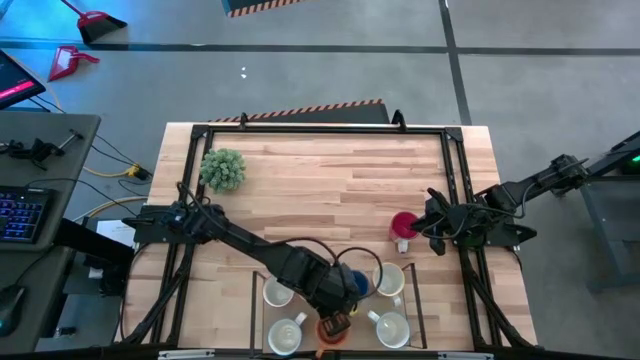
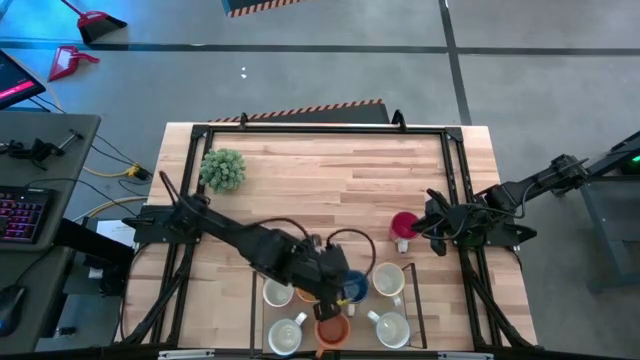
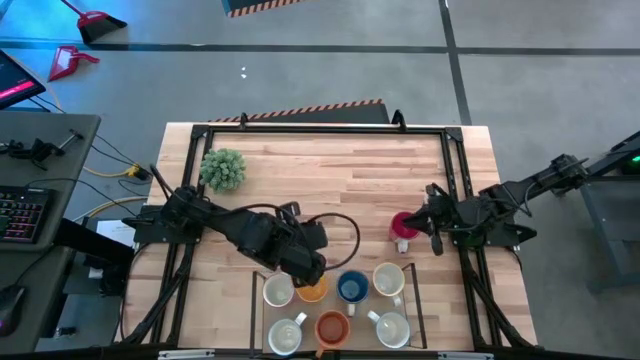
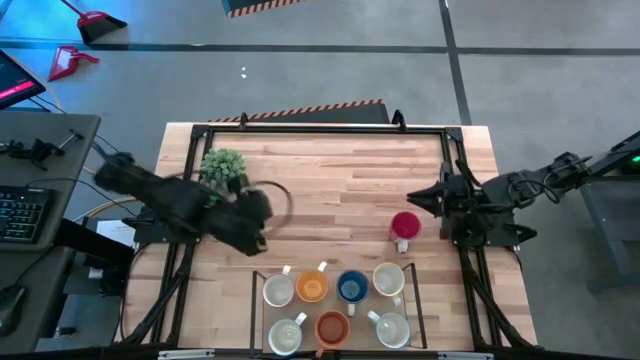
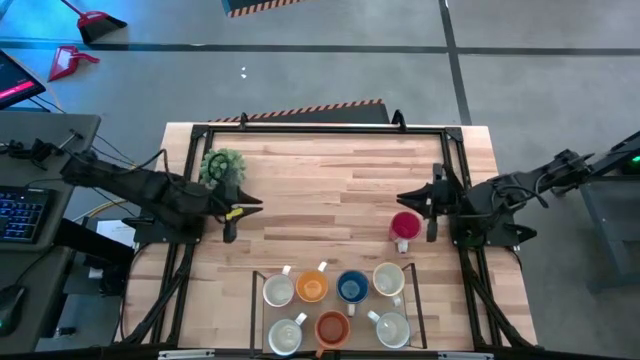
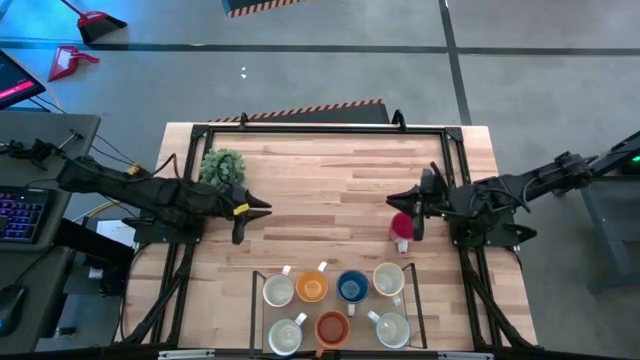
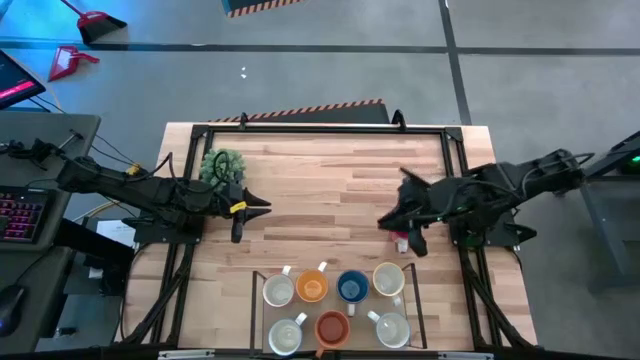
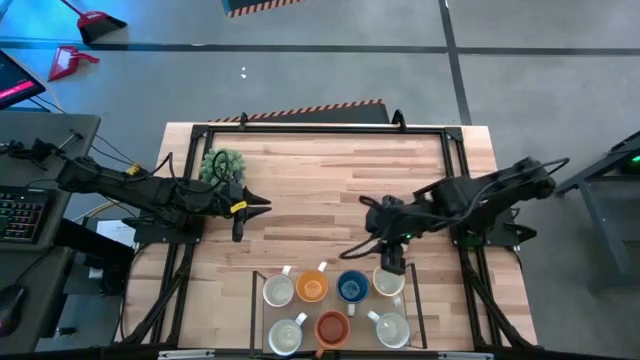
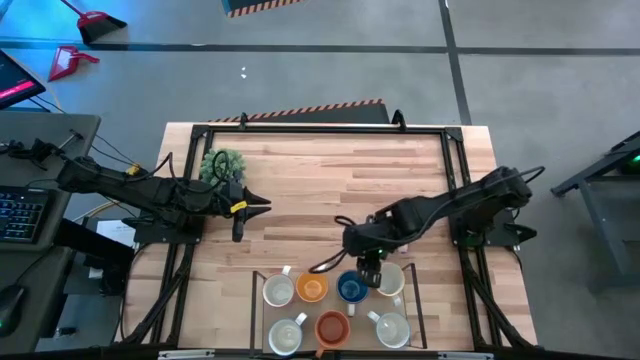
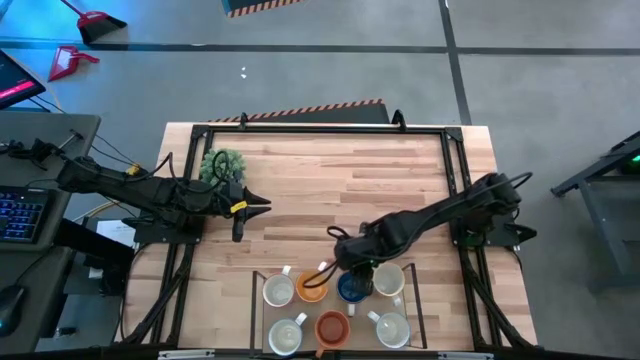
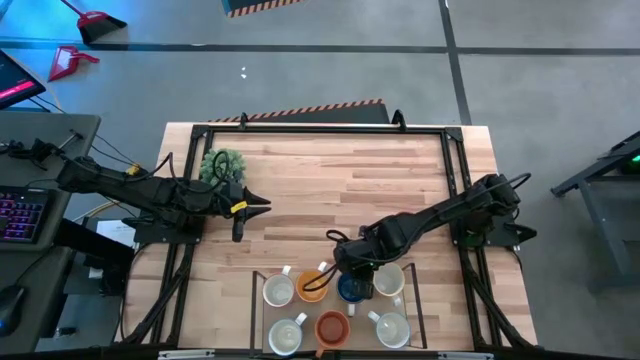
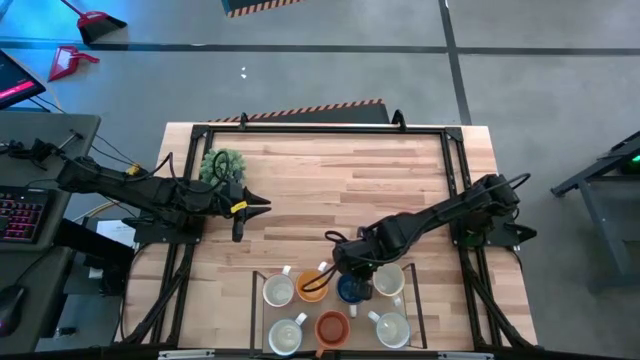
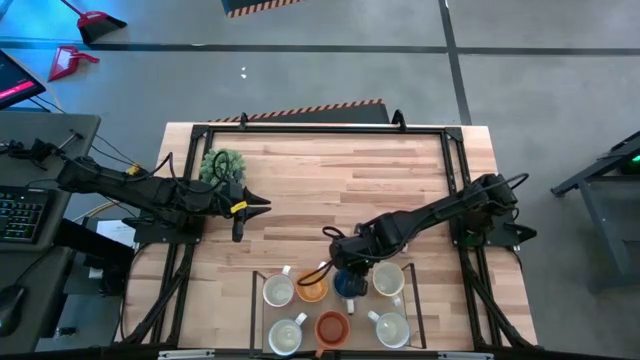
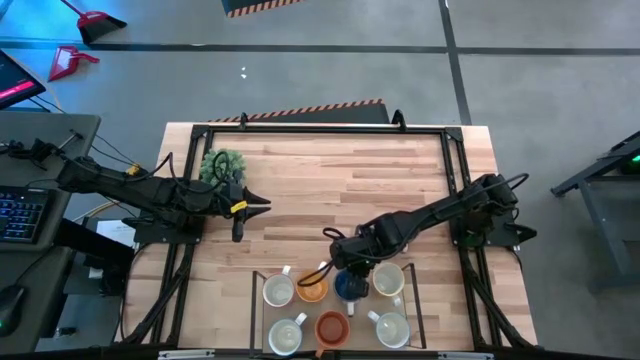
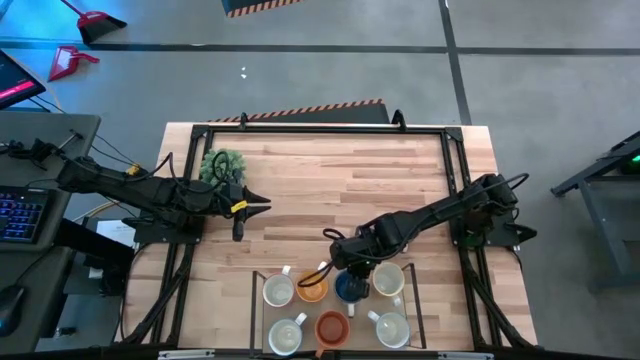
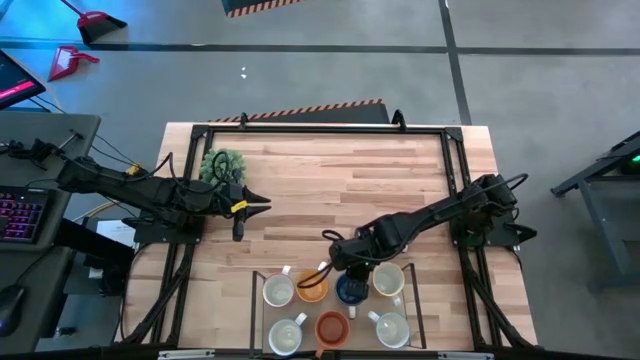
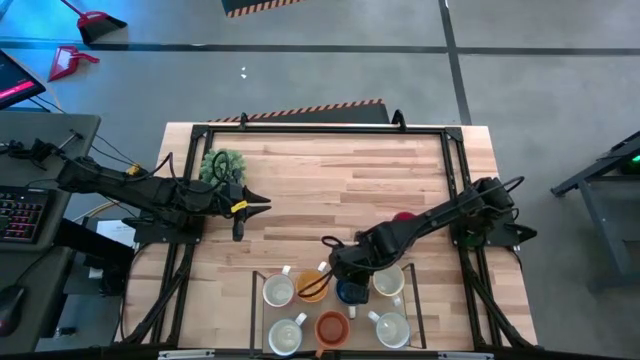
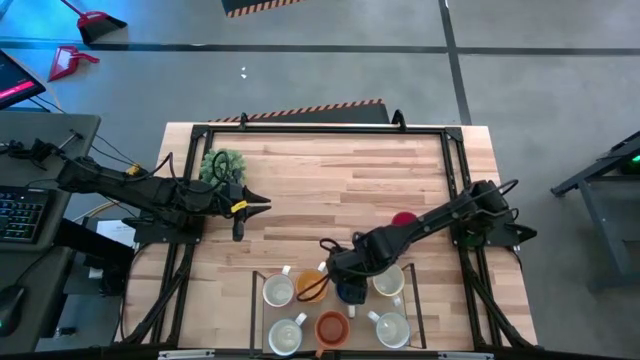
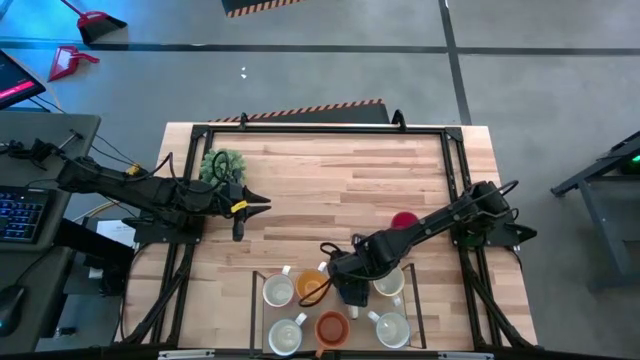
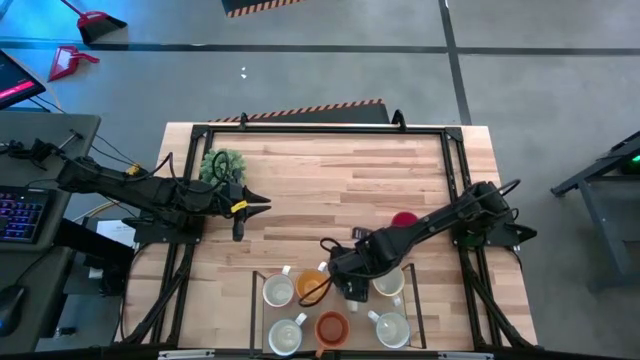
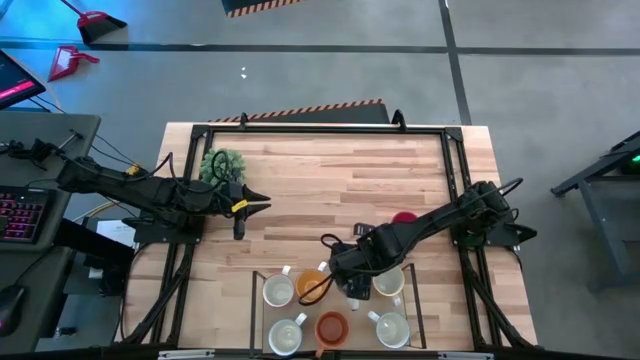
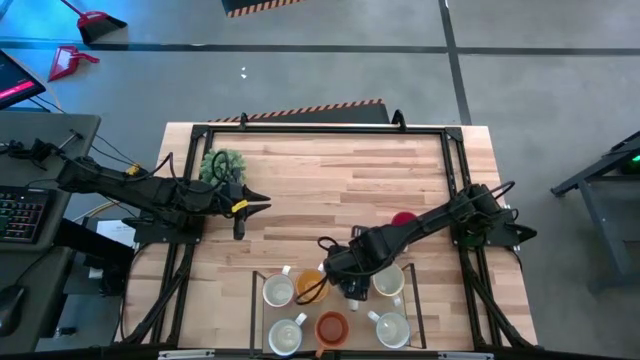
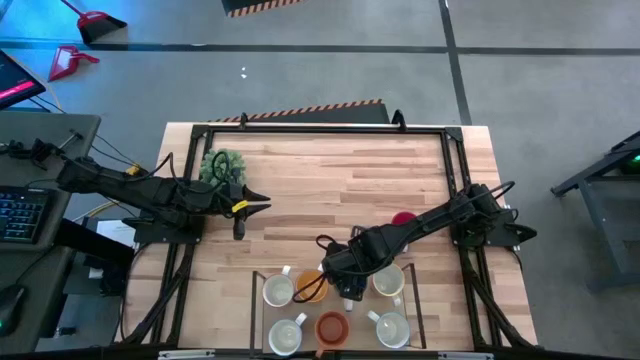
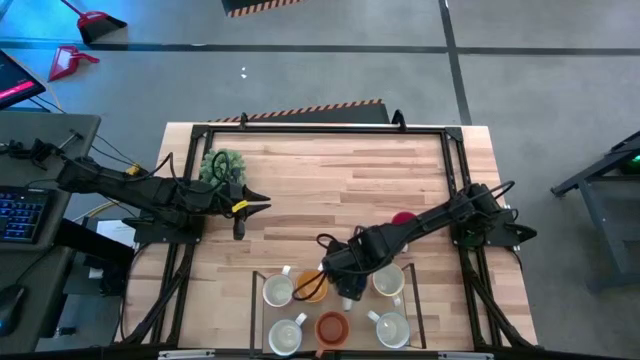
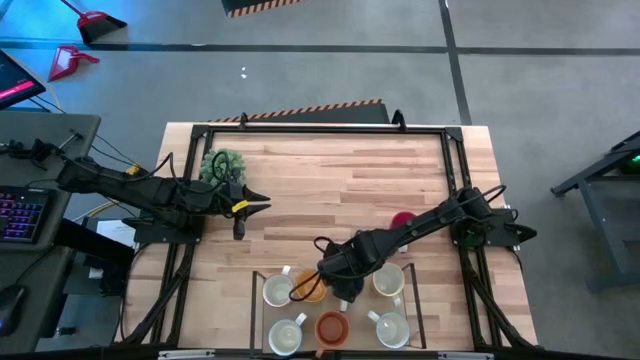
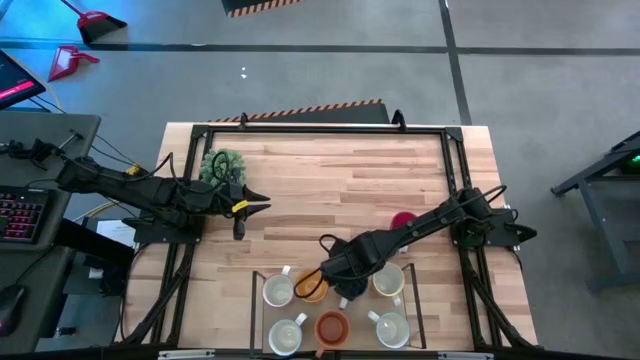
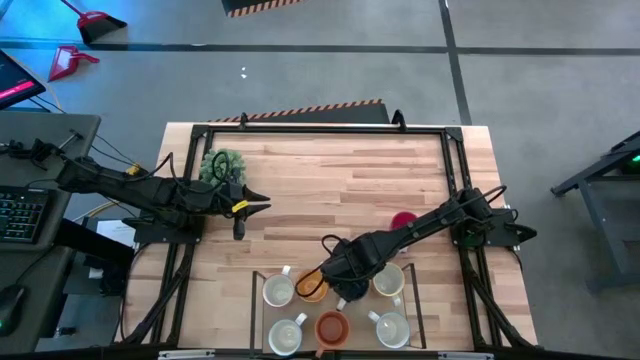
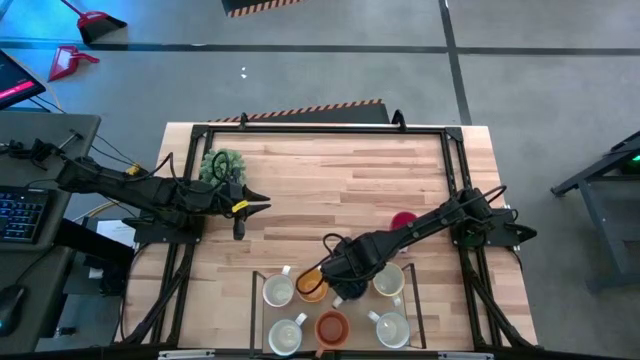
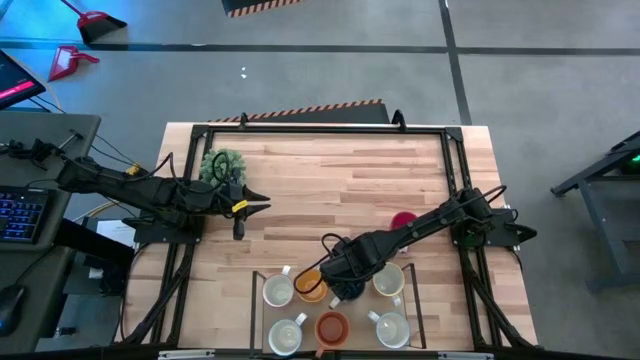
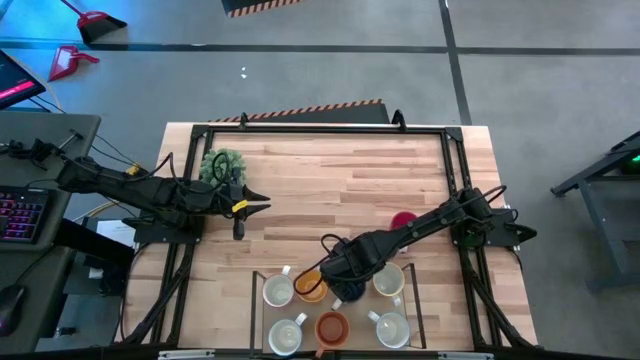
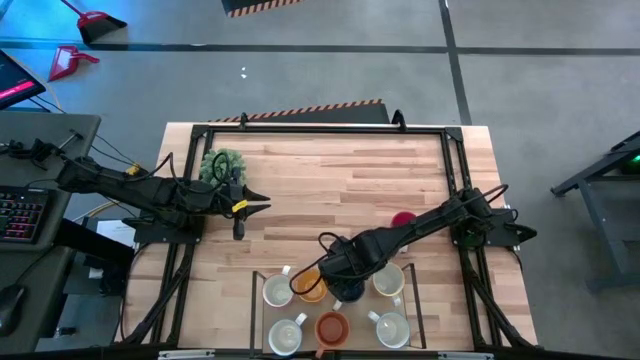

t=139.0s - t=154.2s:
Task: Place coffee mugs
Adjust the blue mug on the shelf

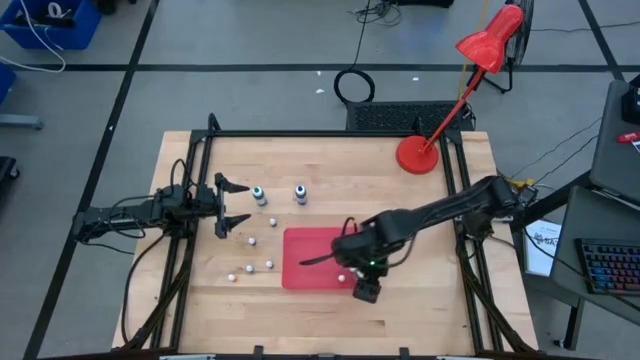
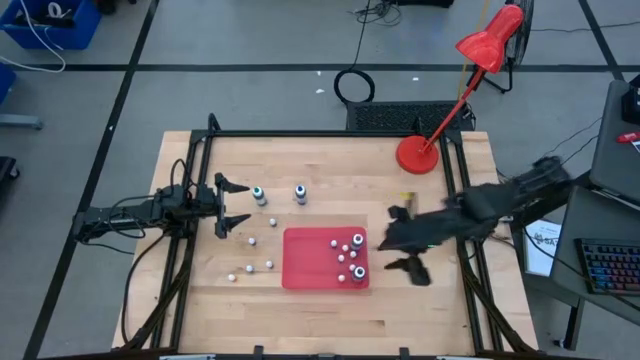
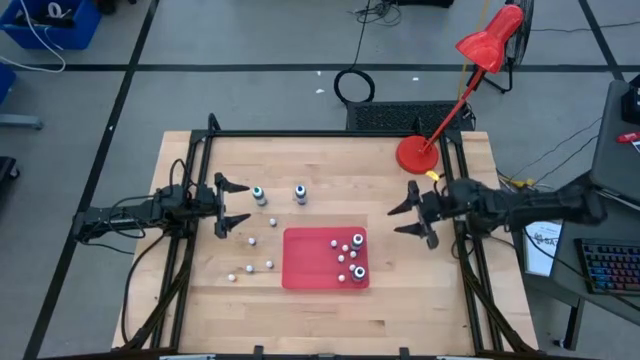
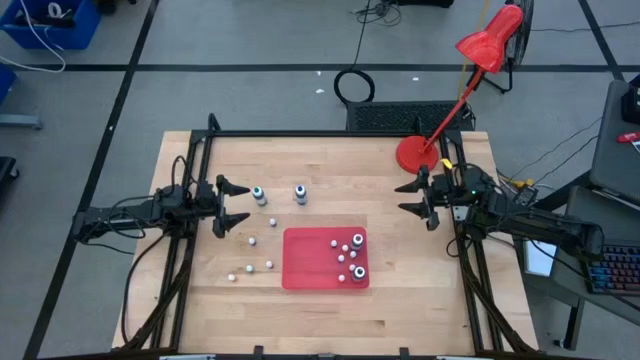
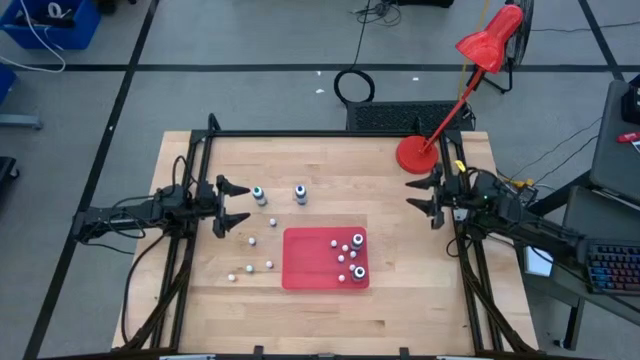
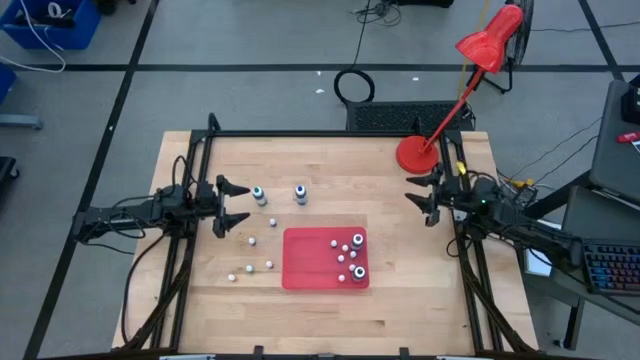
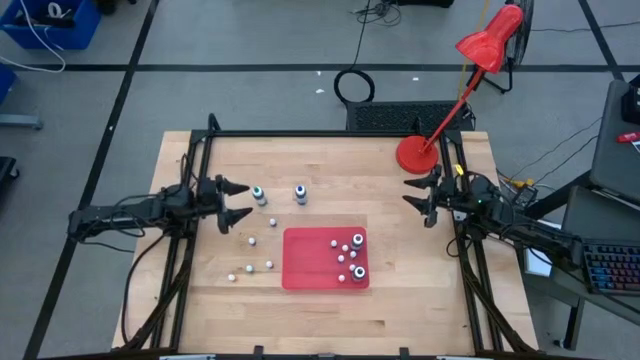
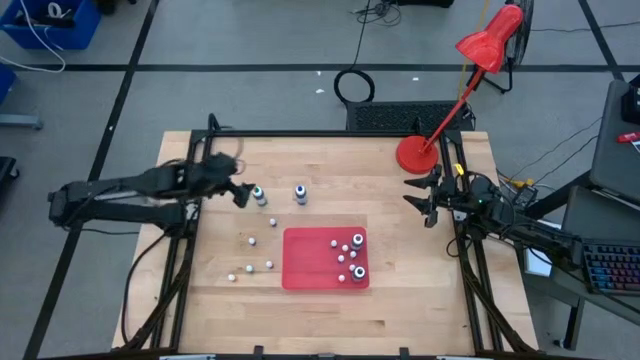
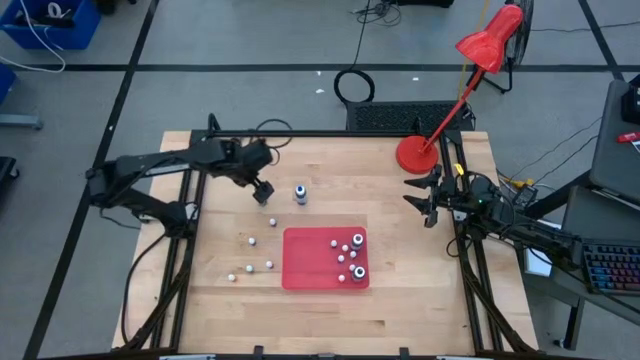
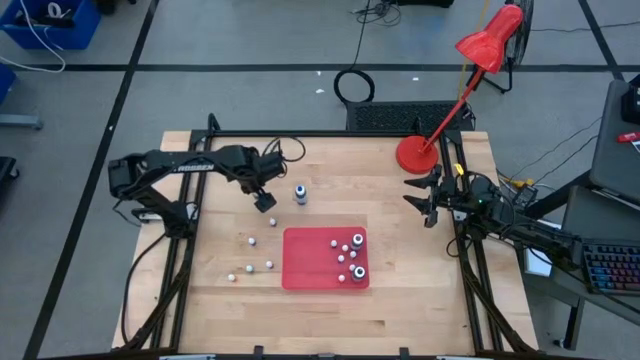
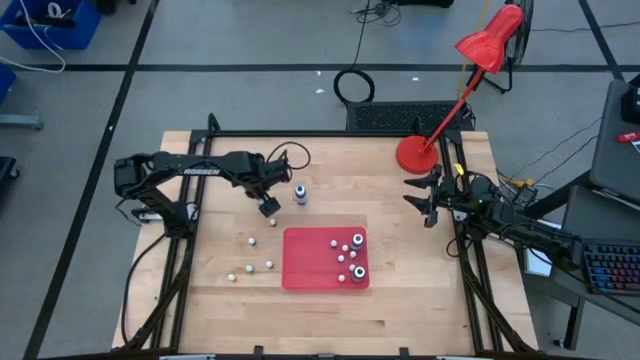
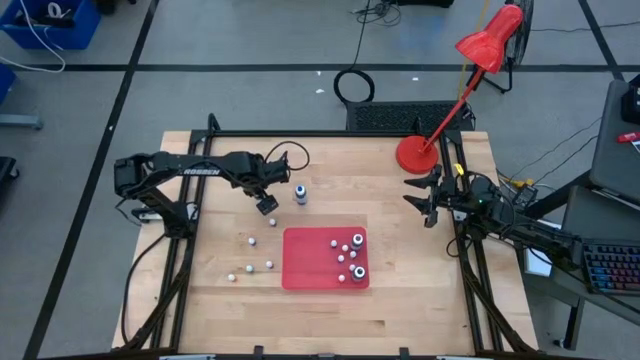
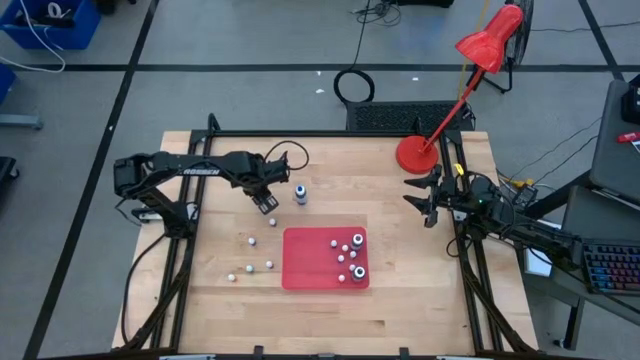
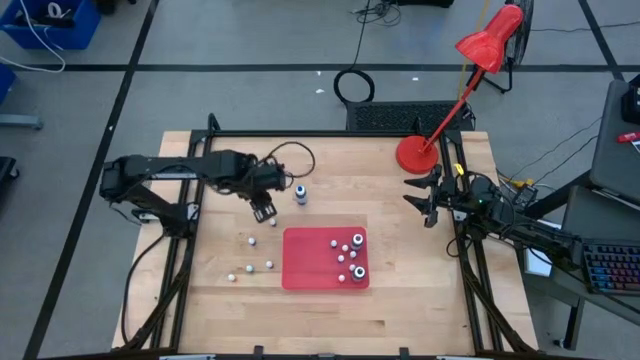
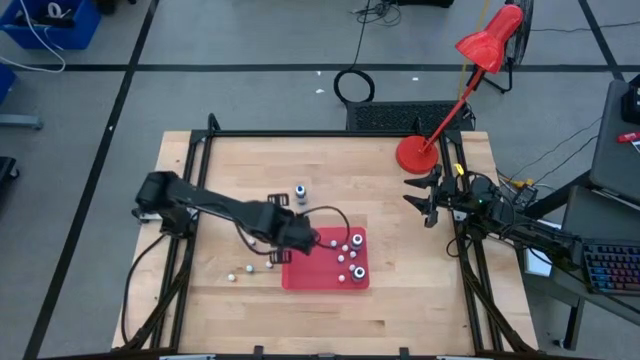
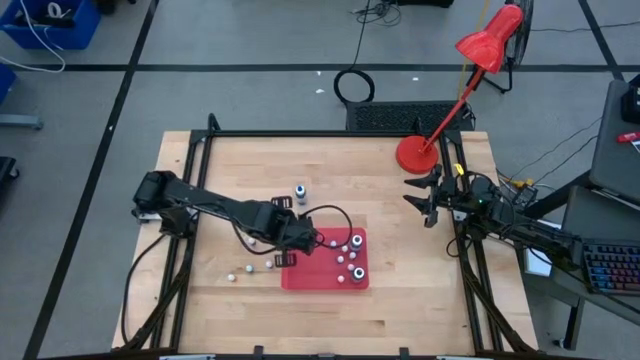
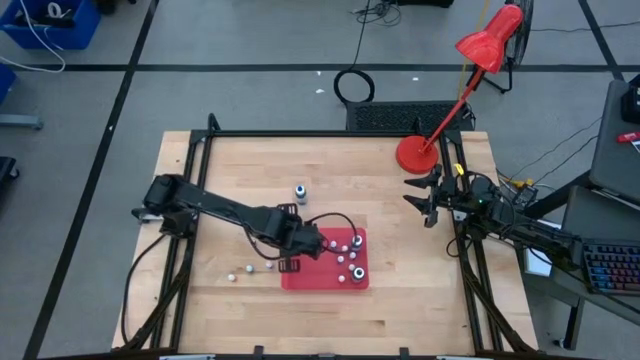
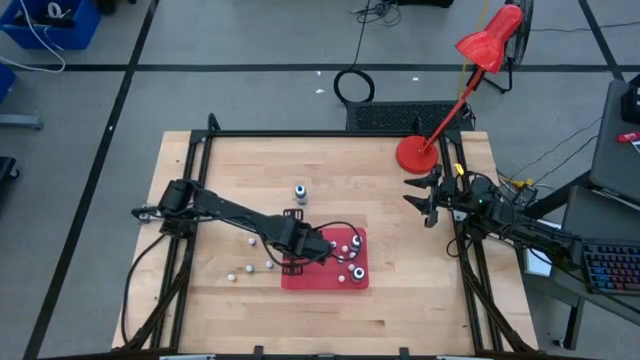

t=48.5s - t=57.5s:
Task: Pick & Place food coloring
Put the large green food coloring bottle into the pink bin
